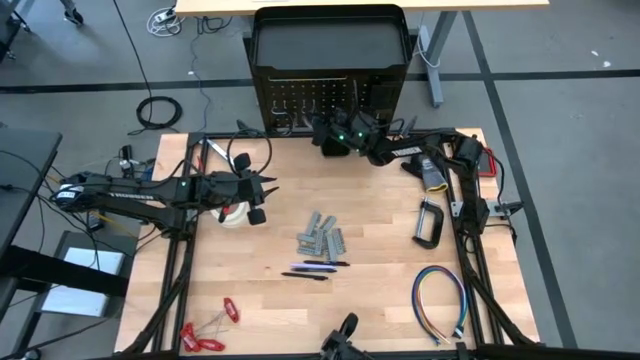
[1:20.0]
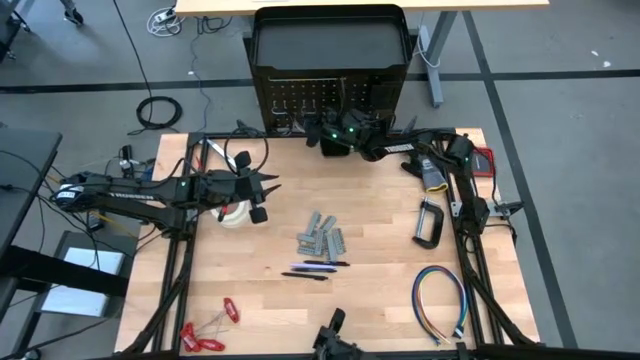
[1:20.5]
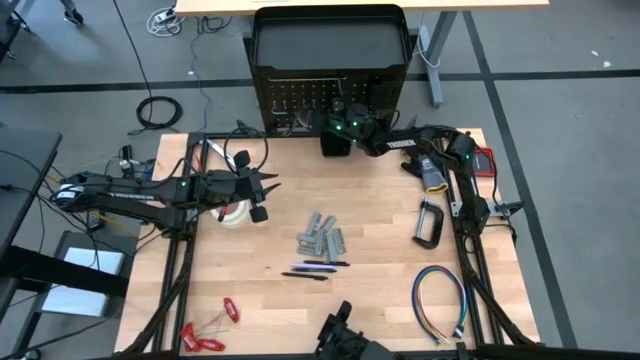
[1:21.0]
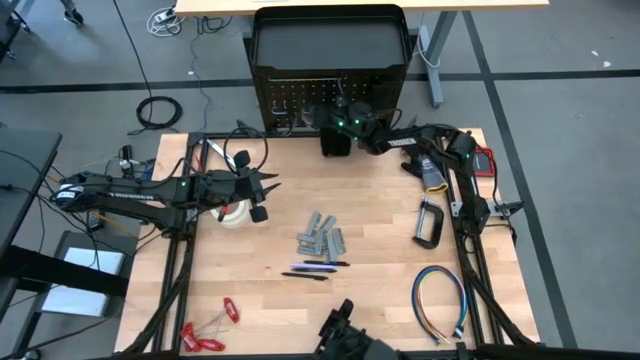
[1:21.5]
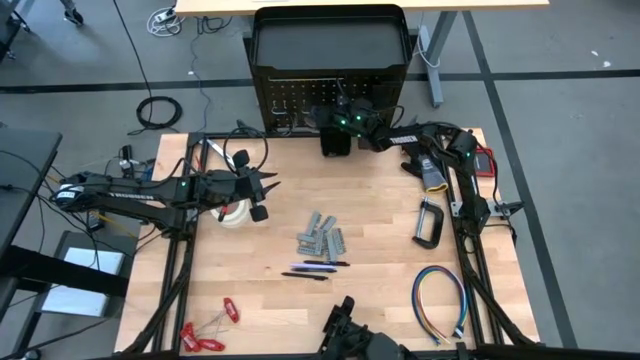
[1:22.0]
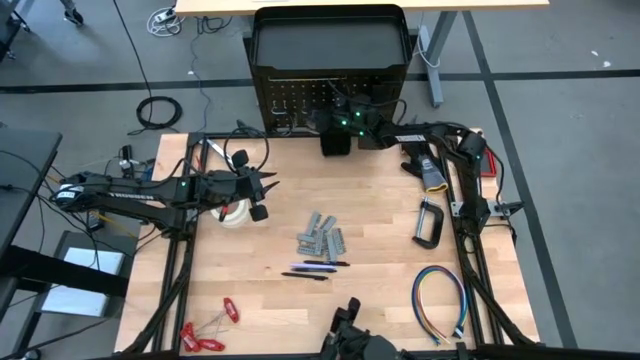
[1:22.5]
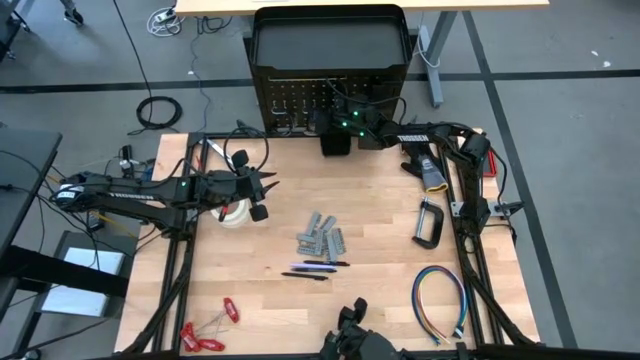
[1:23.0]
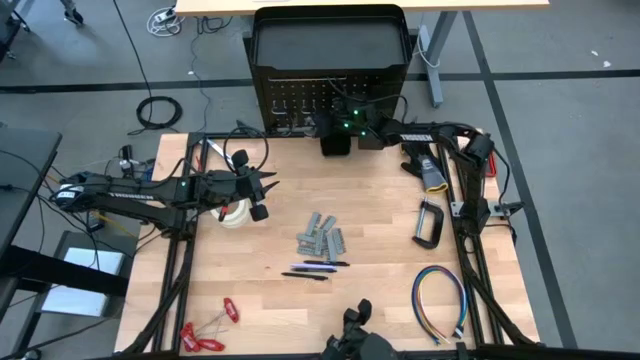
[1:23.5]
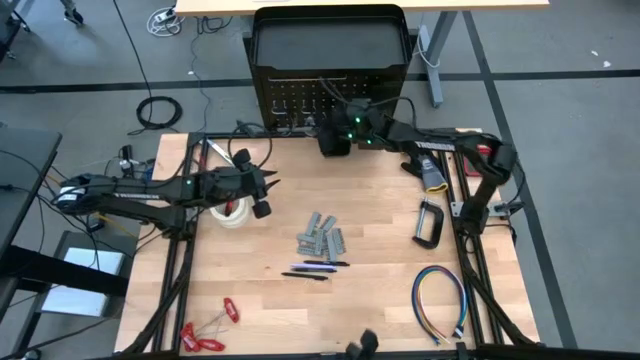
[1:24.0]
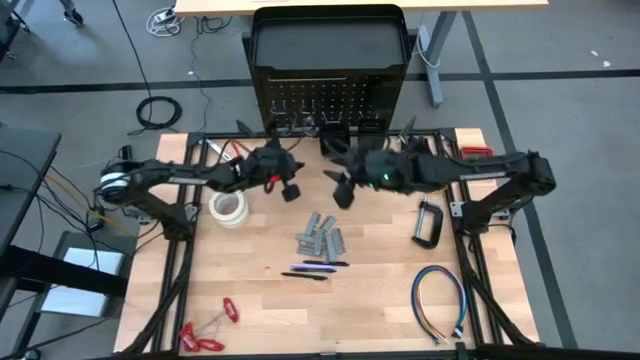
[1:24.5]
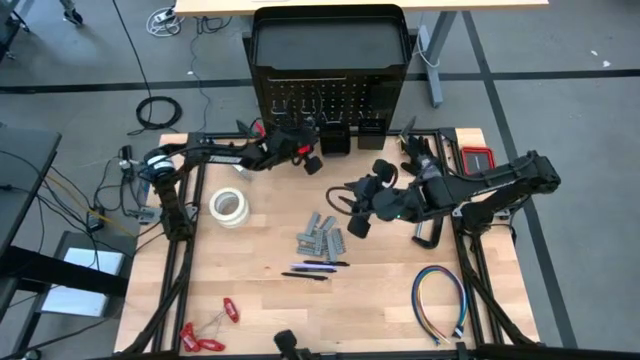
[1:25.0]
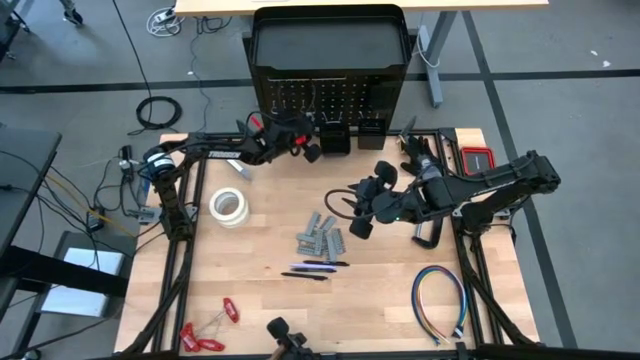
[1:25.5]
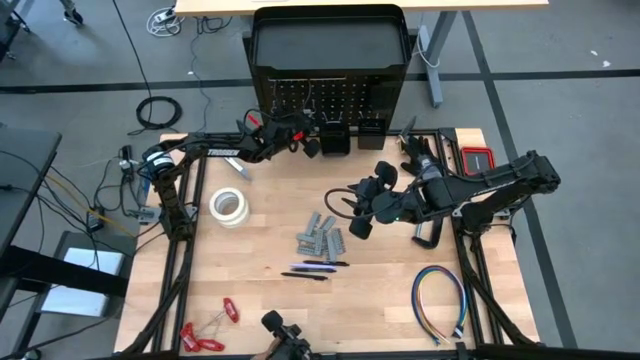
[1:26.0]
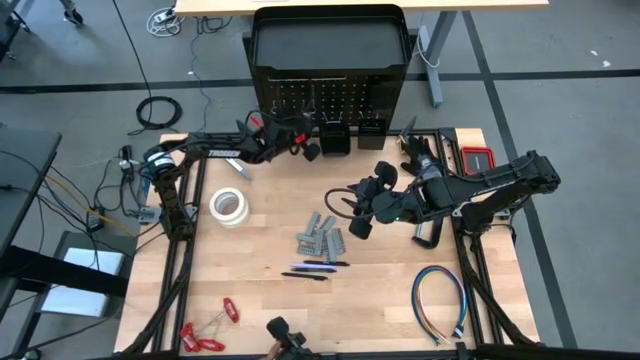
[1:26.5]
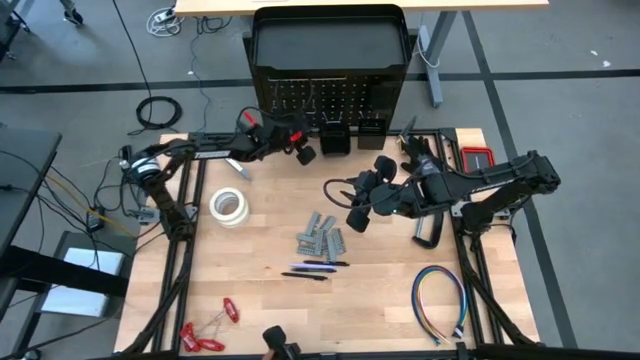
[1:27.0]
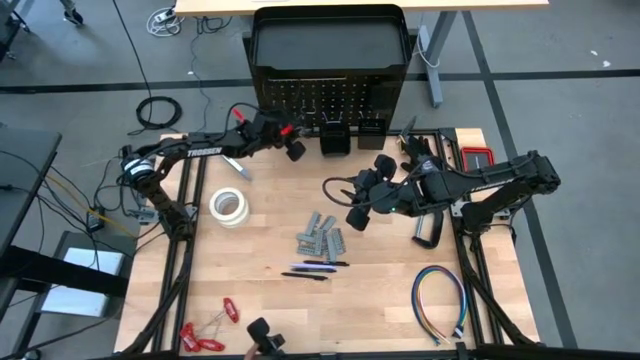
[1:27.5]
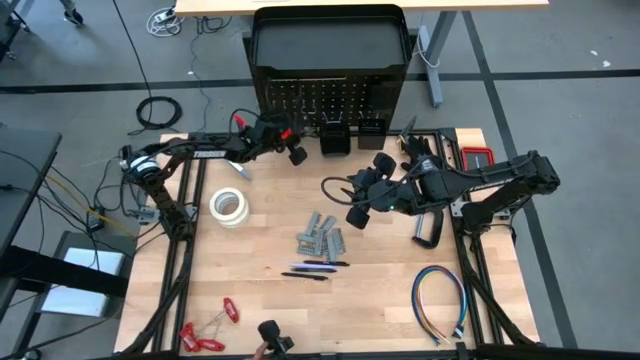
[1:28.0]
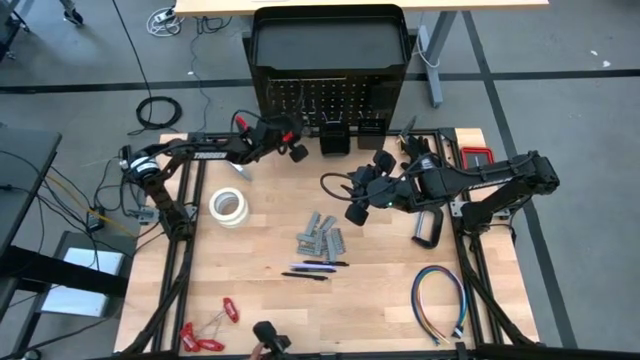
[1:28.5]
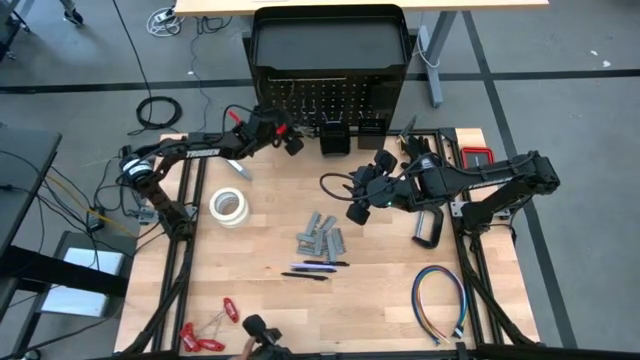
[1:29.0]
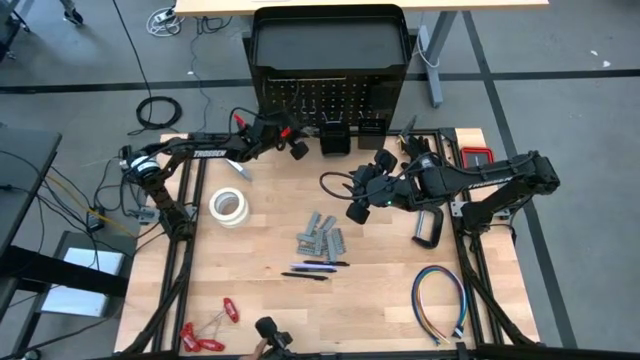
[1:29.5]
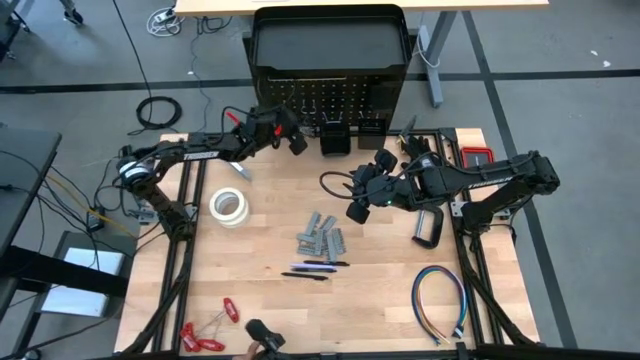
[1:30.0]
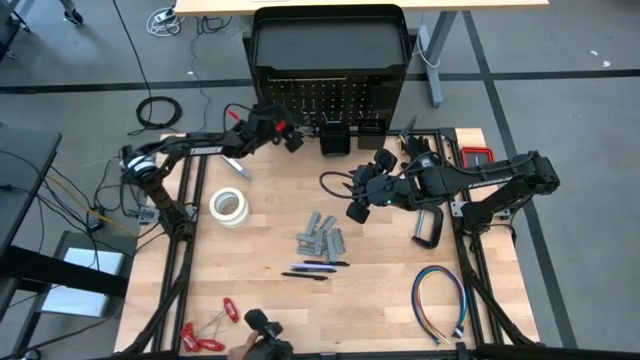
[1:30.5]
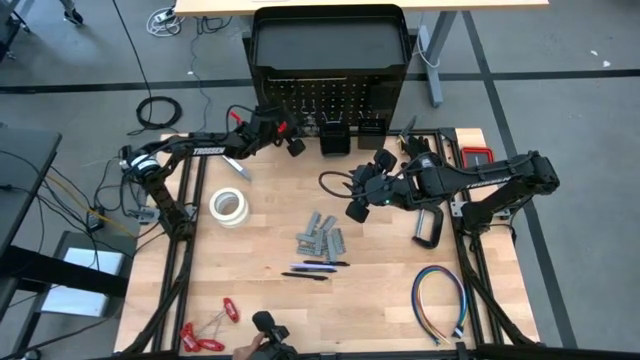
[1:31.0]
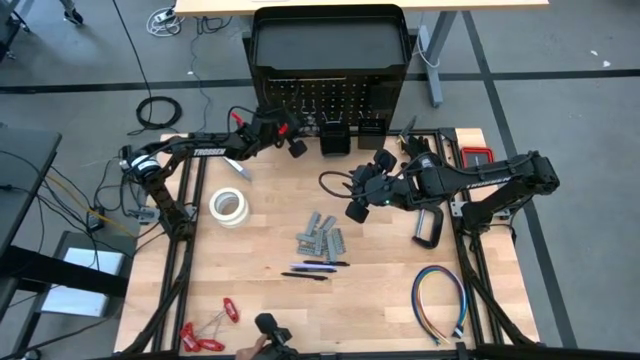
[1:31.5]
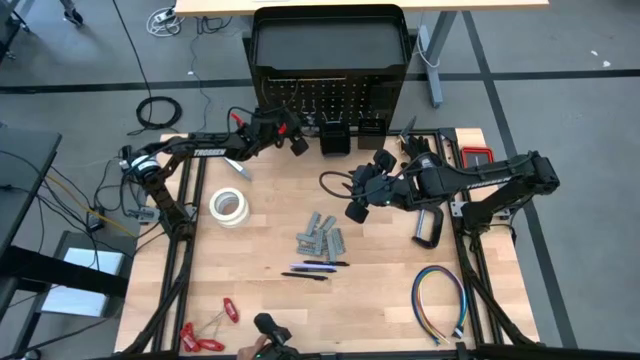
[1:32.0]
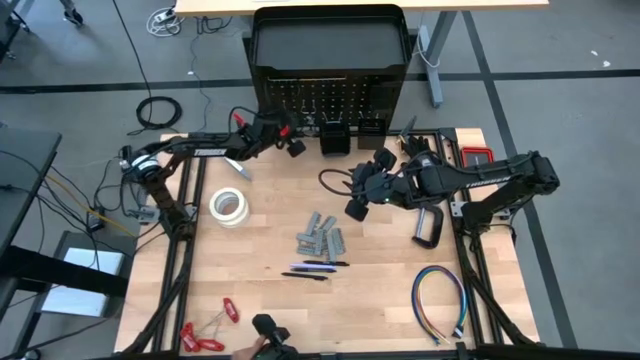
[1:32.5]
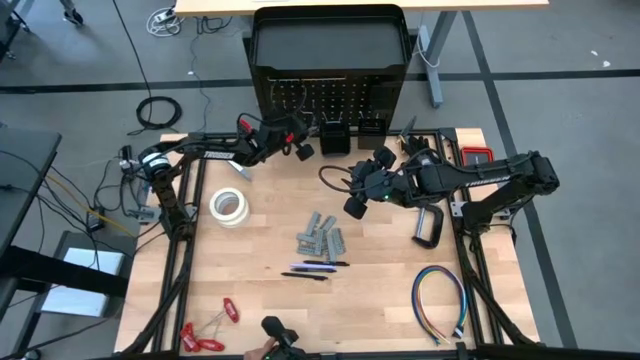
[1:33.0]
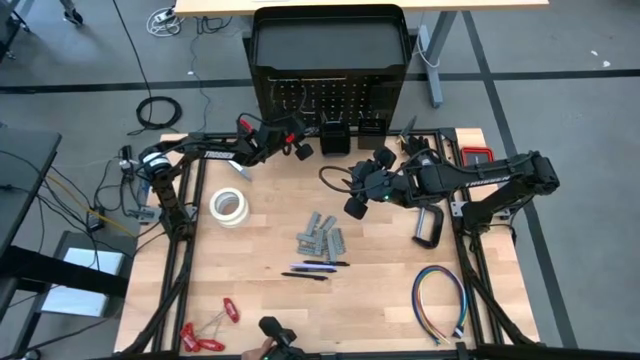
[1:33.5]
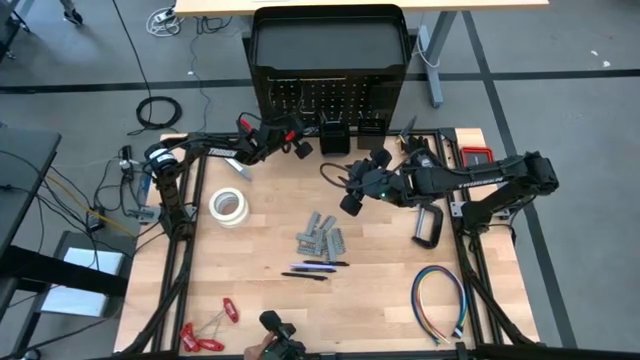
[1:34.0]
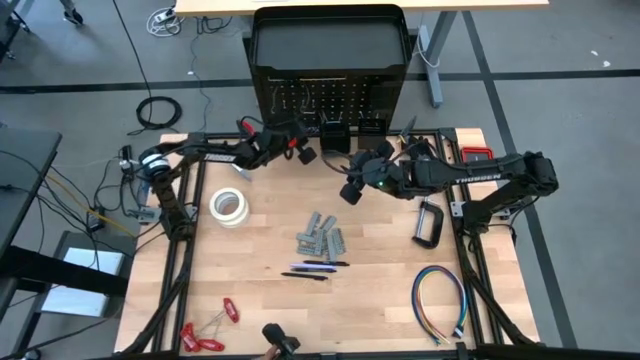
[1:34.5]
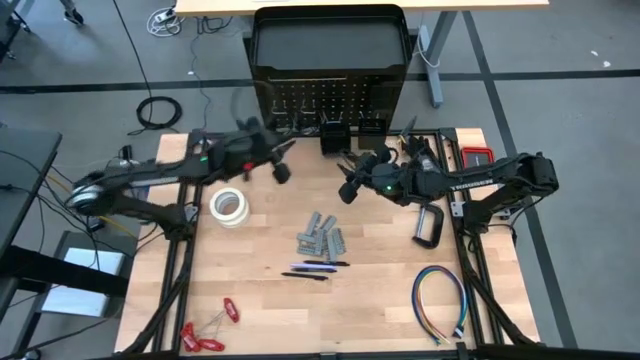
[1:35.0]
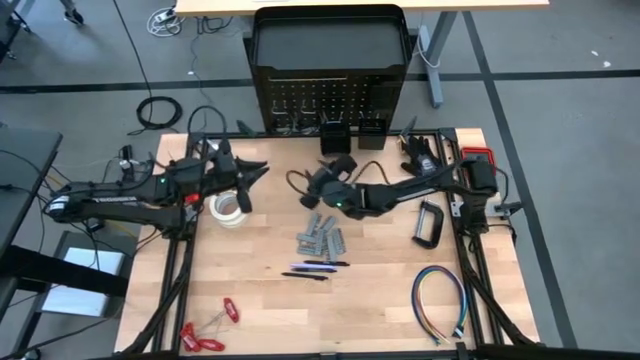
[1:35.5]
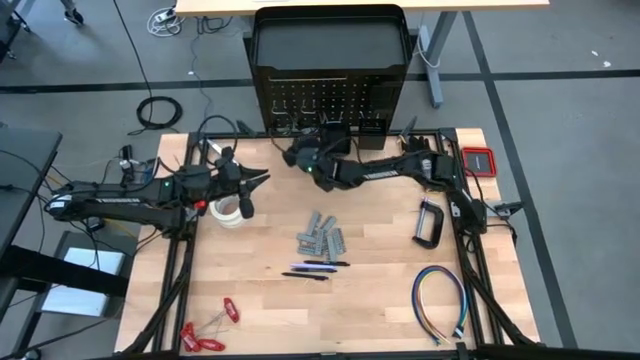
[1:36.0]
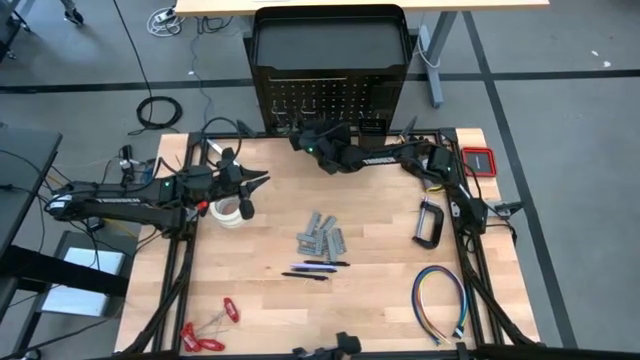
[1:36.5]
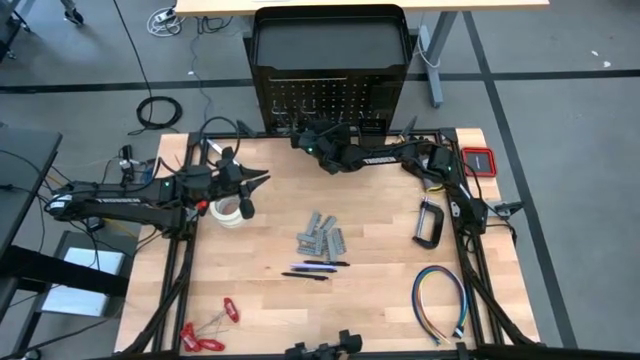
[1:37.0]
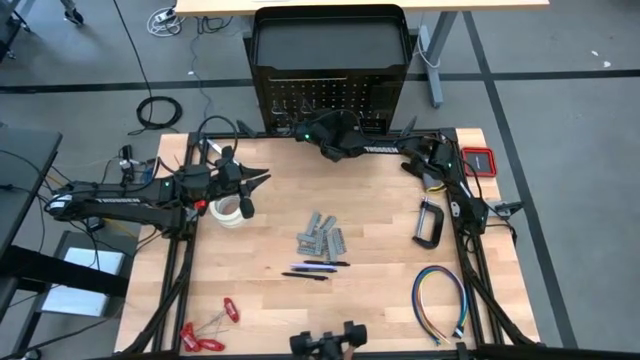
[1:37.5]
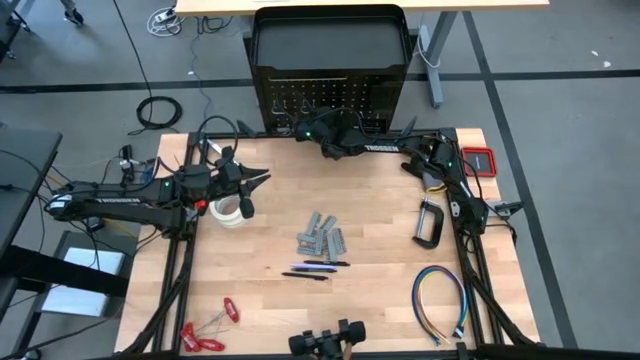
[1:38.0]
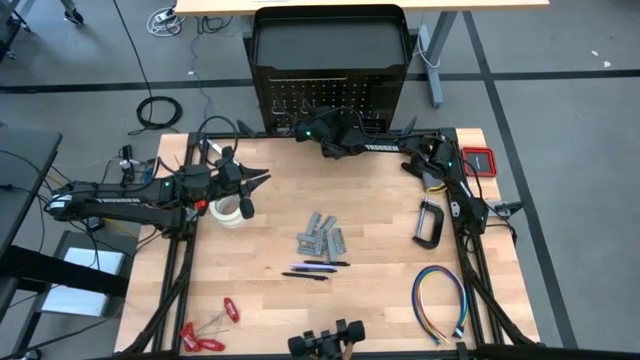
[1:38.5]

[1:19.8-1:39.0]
Task: Hang tools onto peg board
Hang the black safety glasses on the peg board

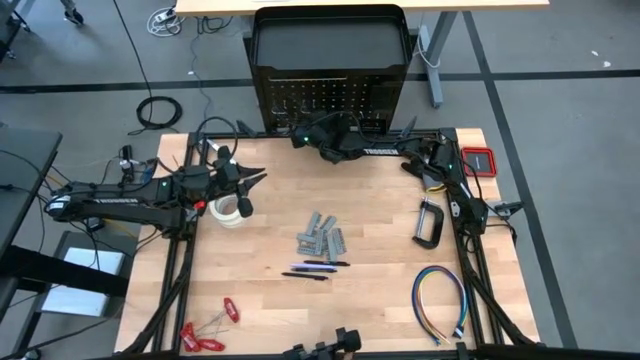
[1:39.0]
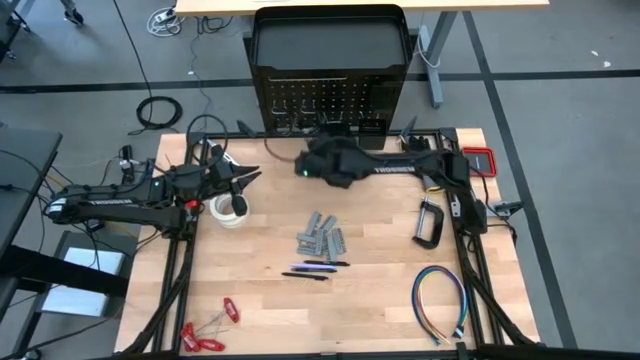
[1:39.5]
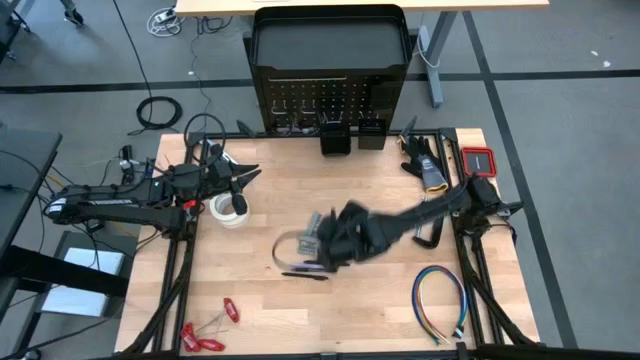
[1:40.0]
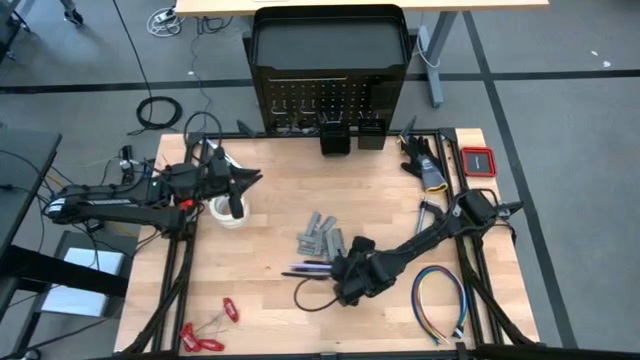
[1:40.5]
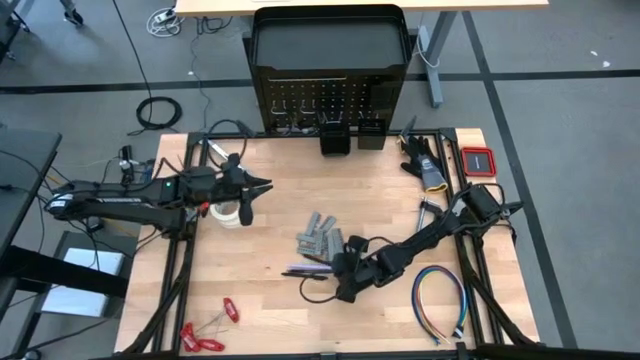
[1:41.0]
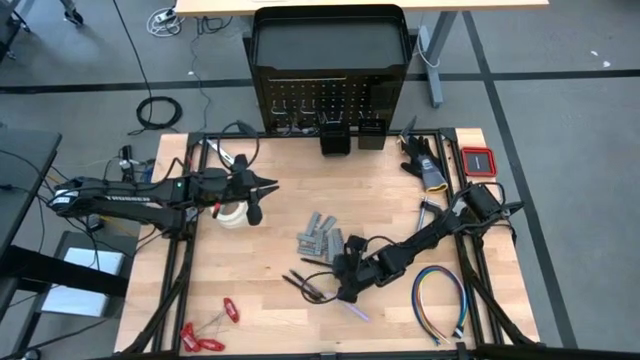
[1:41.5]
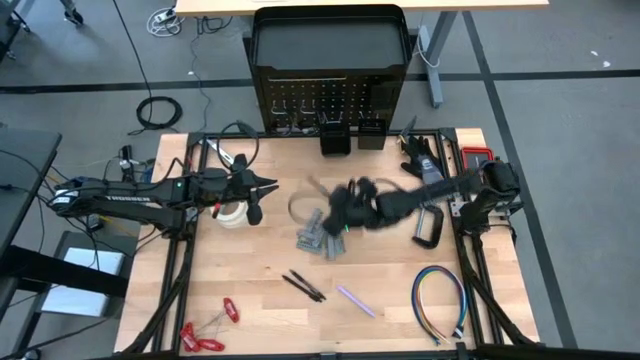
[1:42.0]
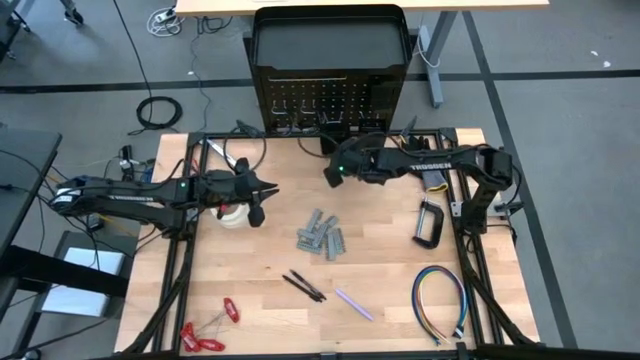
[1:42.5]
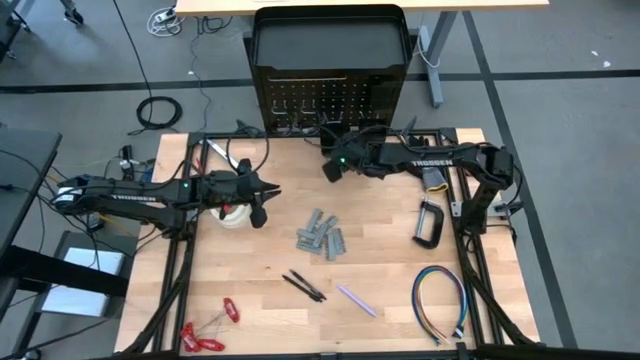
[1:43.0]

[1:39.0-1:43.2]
Put the black pen into the left black bin on the peg board
